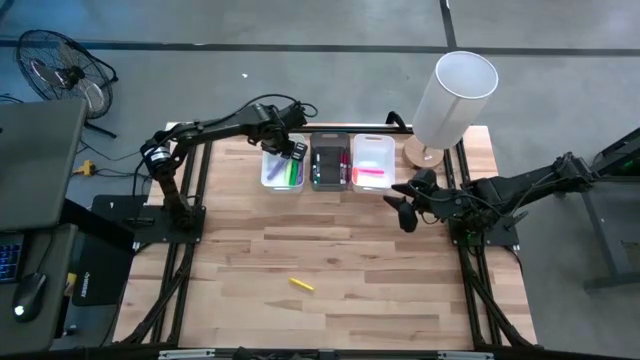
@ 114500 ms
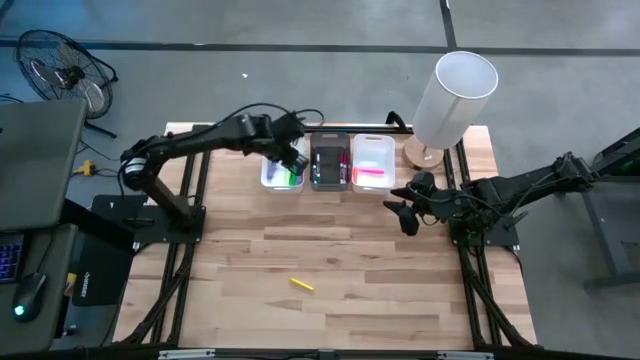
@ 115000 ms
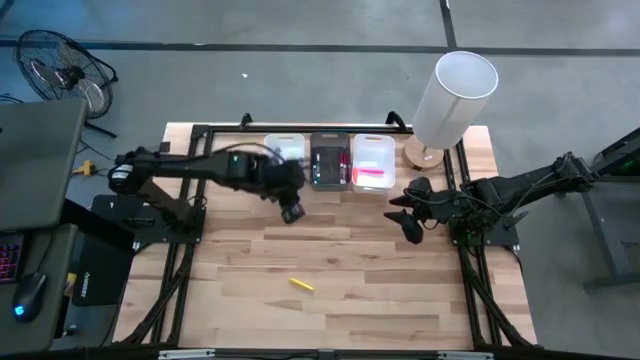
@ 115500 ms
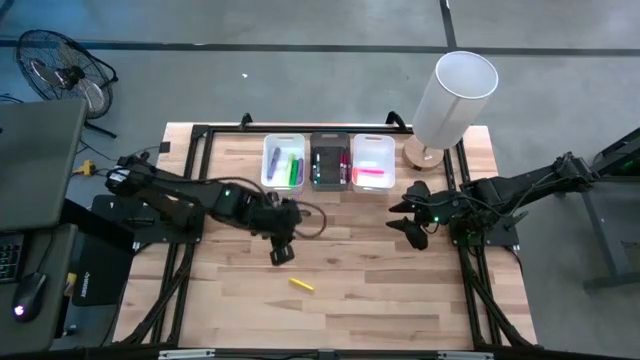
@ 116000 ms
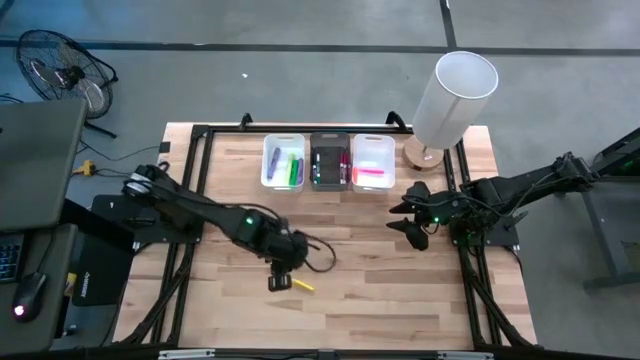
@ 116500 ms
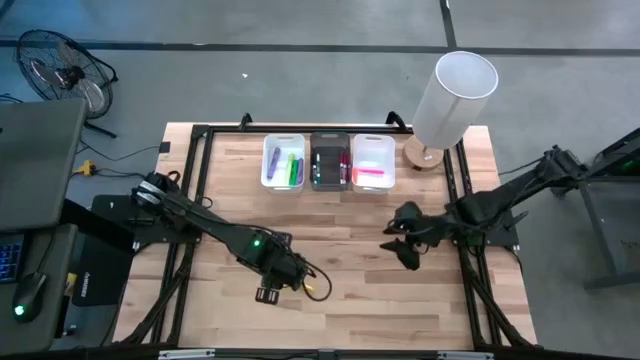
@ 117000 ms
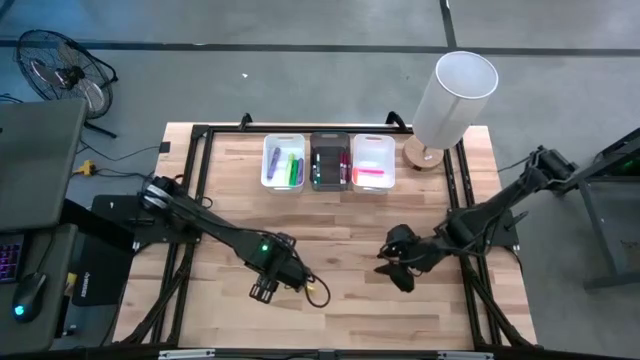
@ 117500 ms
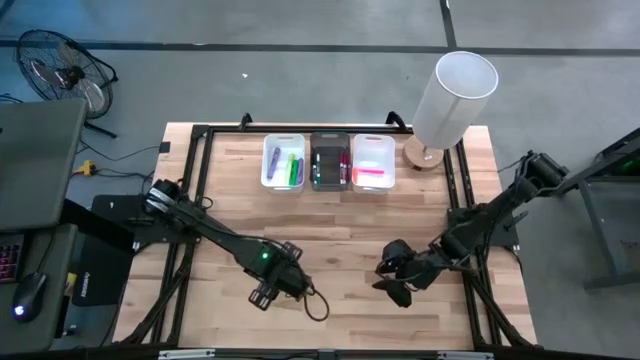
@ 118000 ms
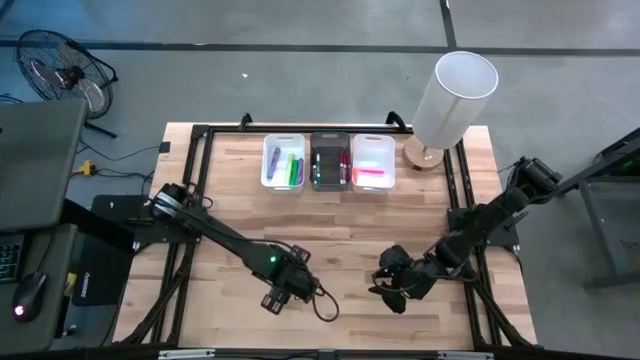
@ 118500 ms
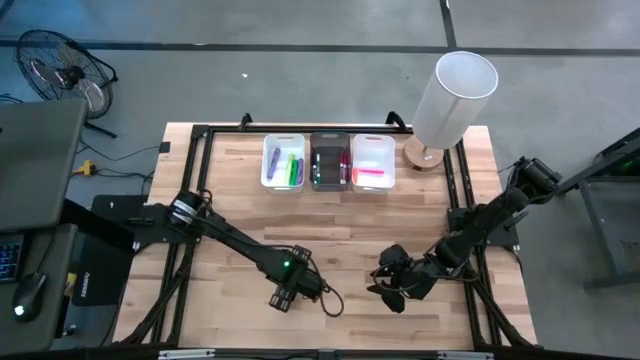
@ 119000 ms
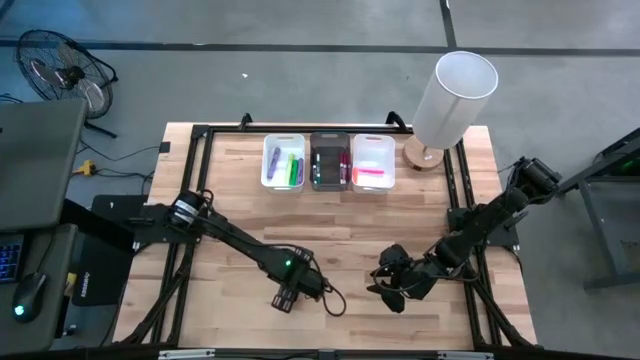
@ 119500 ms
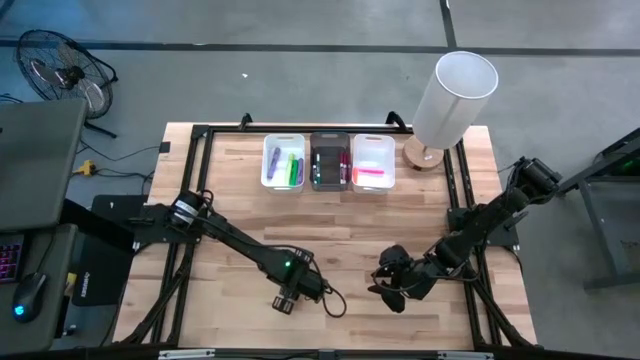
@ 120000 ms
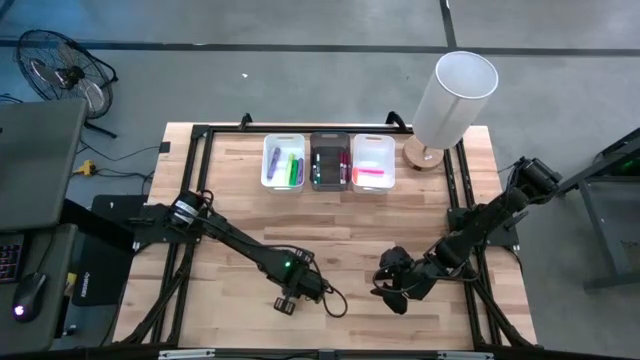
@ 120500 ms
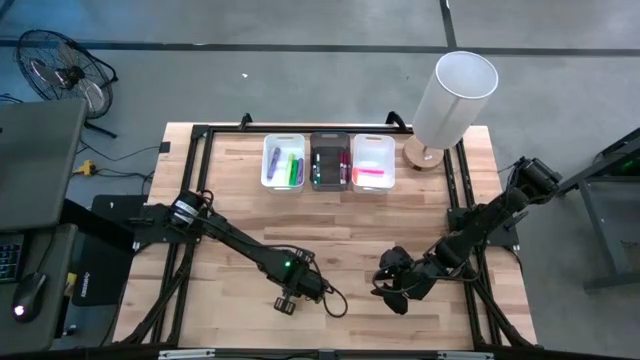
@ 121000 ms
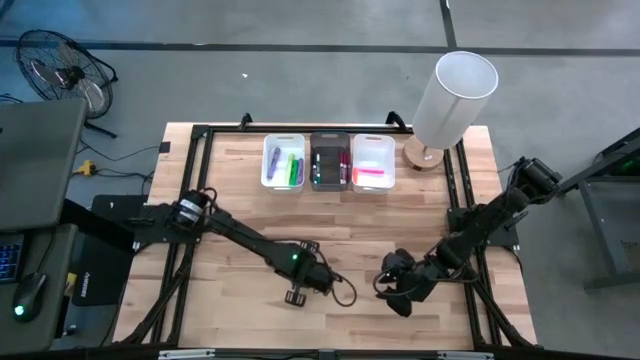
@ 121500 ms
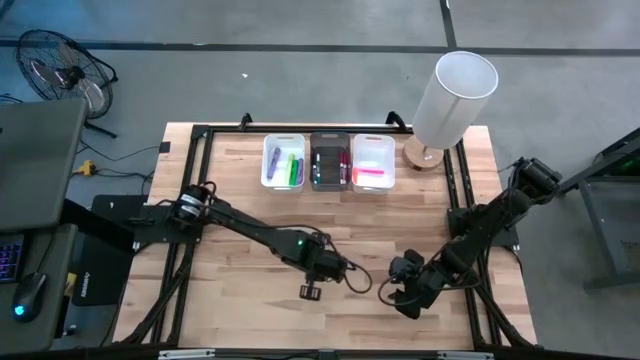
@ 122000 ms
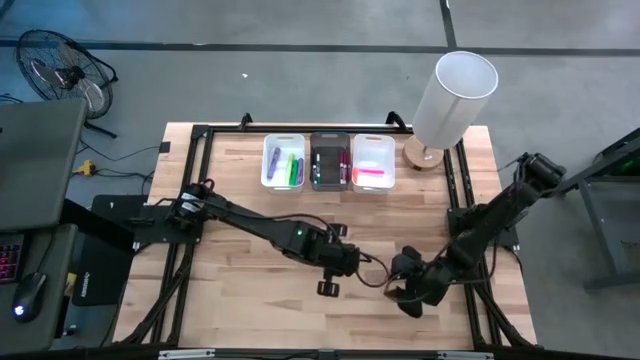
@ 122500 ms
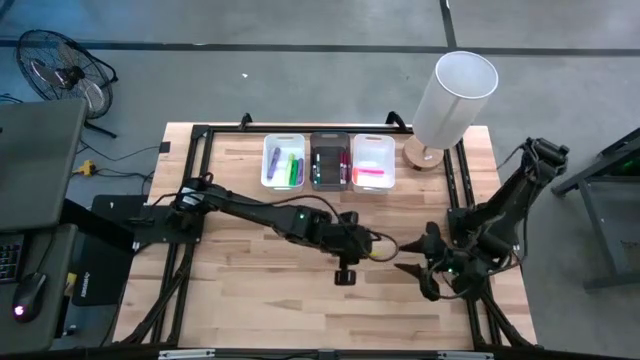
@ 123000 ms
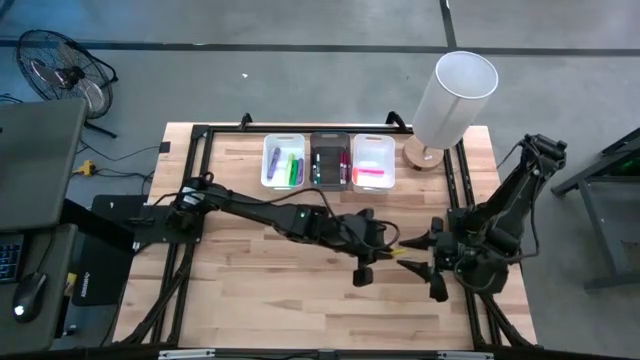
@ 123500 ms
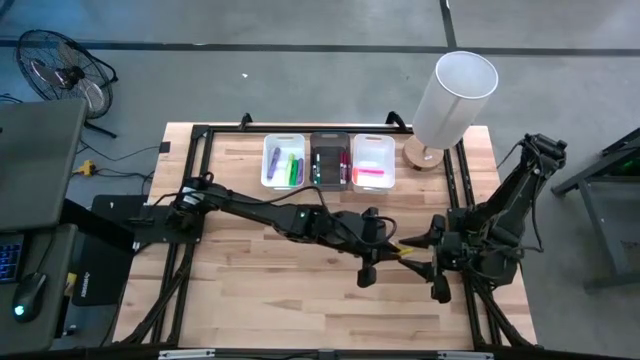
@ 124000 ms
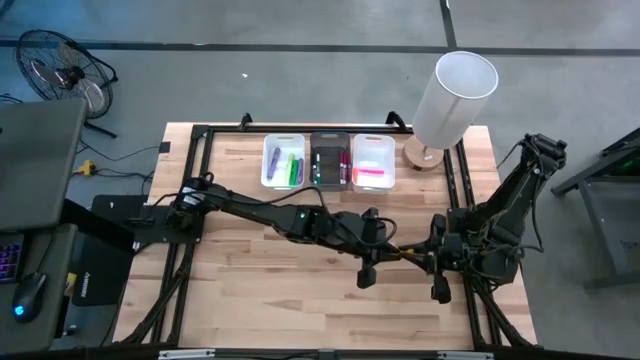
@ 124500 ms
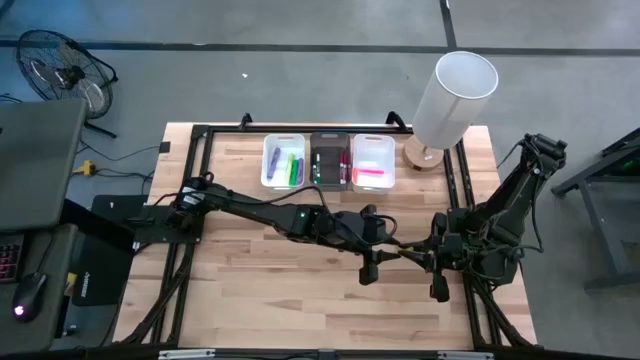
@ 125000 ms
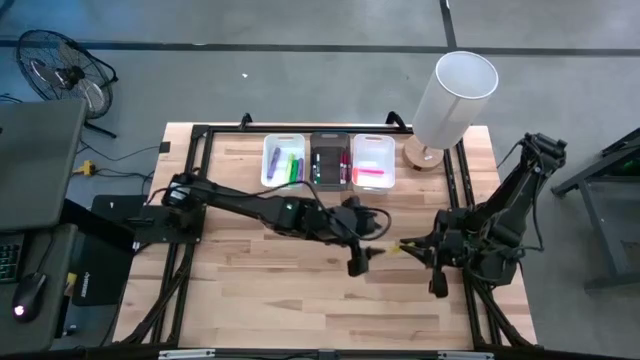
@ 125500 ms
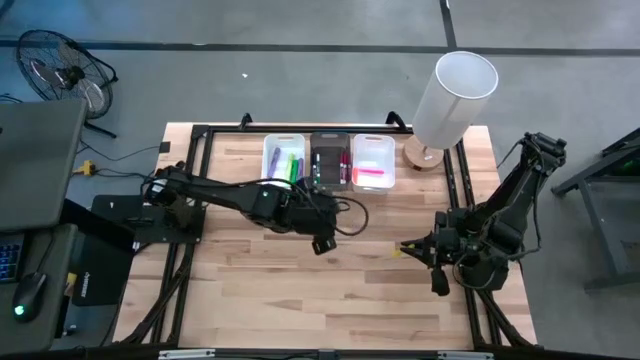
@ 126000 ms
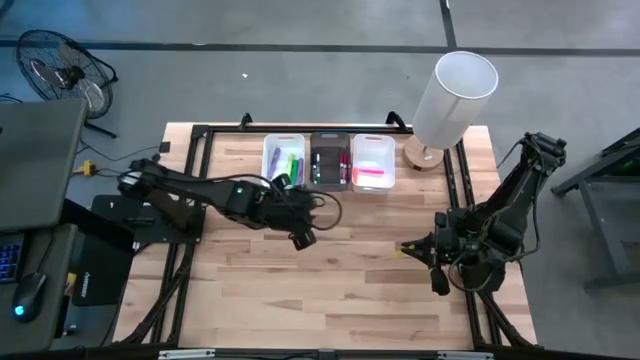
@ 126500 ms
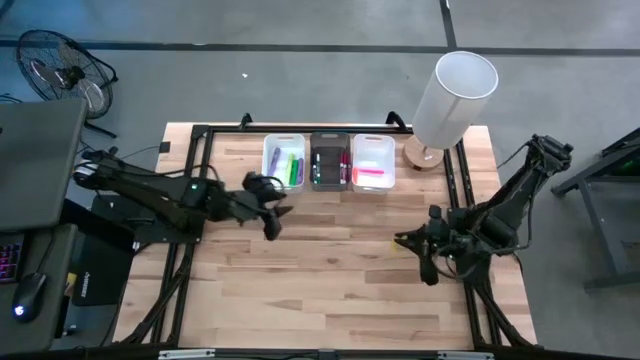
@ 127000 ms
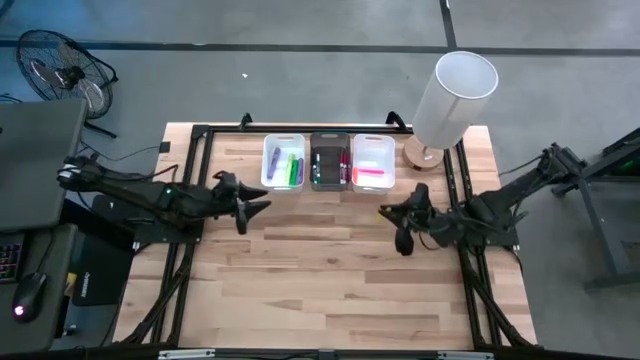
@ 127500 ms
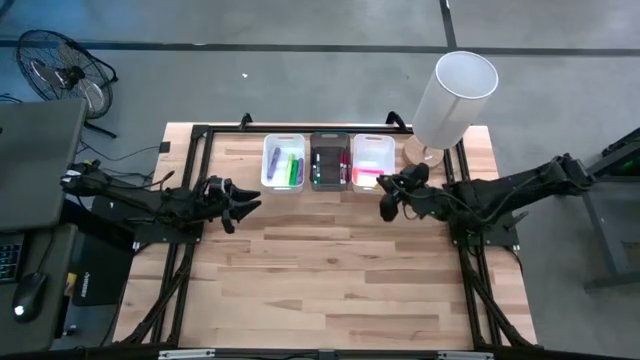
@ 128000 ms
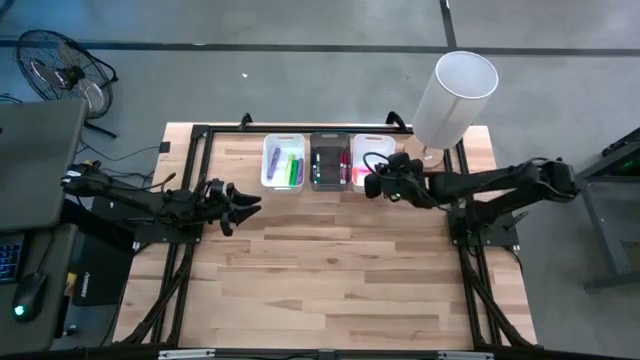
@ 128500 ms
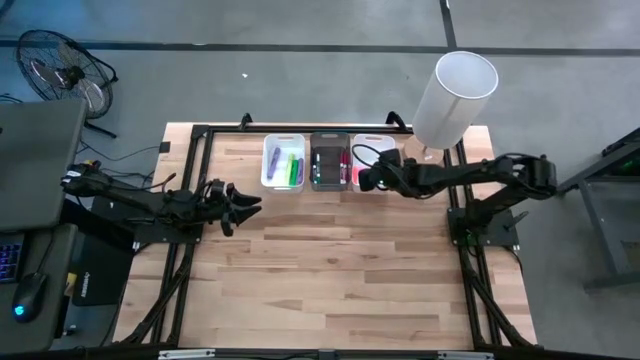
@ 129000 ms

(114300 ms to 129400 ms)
Task: Pick & Place Markers
Put the yellow pen into the right white bin

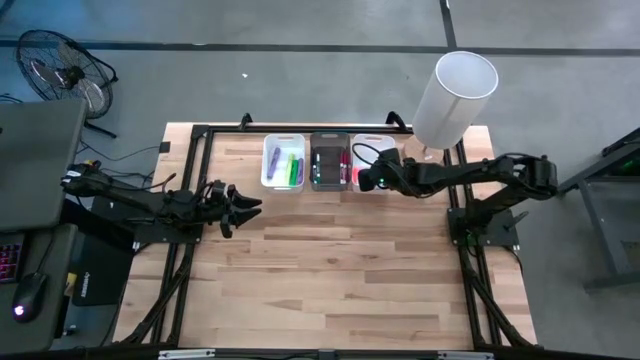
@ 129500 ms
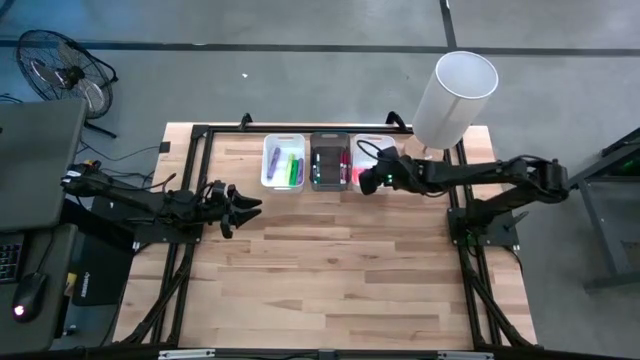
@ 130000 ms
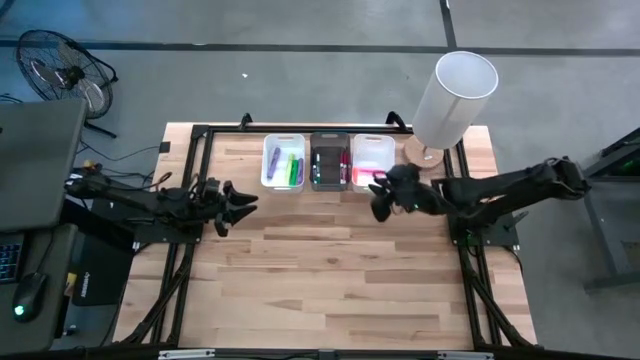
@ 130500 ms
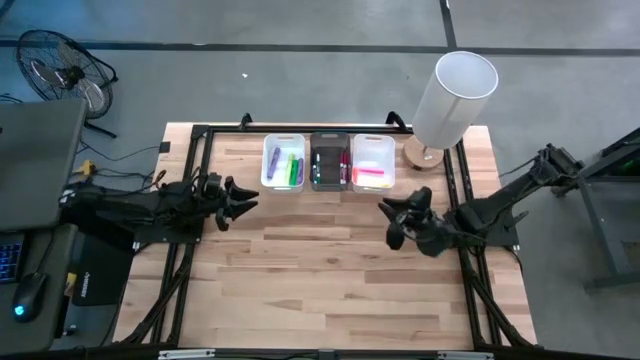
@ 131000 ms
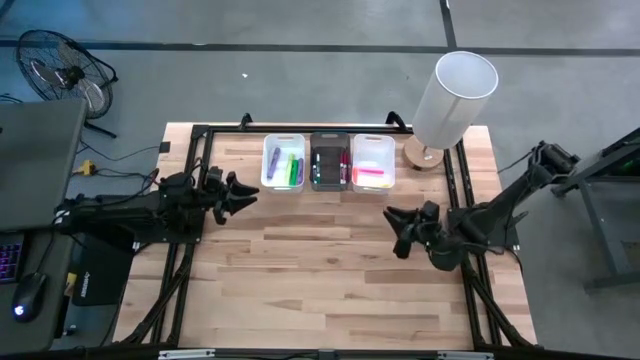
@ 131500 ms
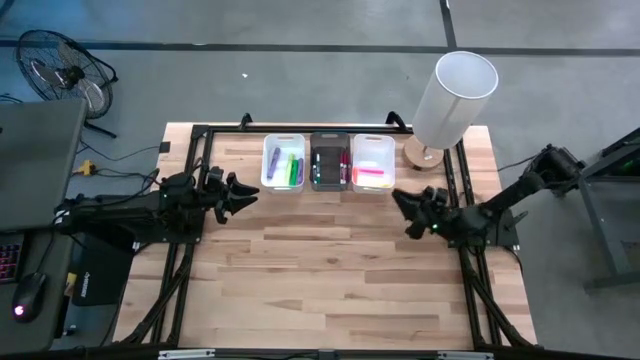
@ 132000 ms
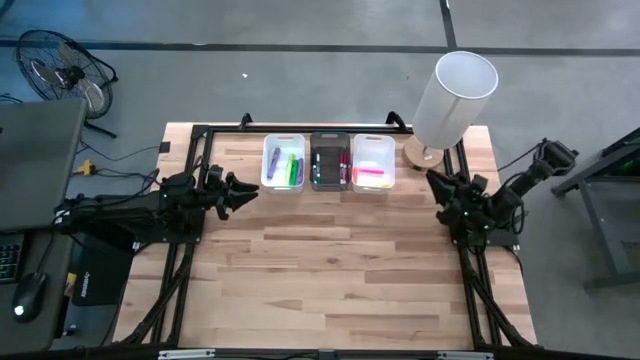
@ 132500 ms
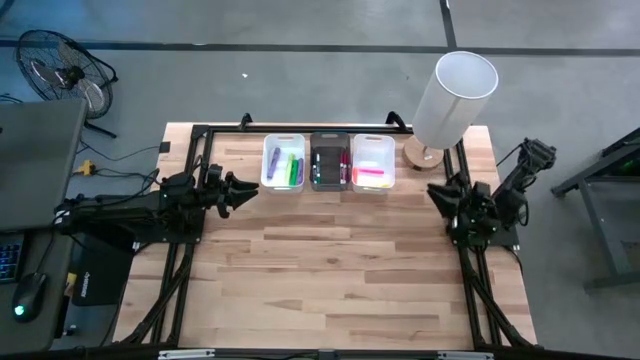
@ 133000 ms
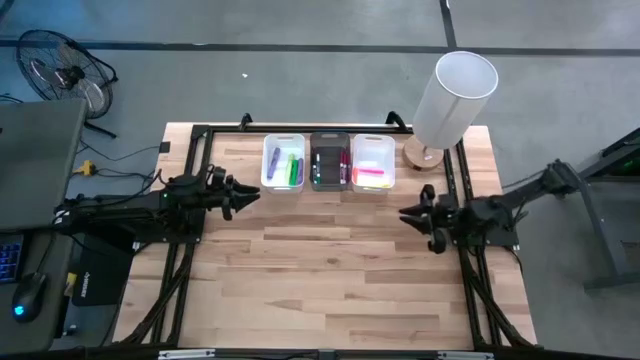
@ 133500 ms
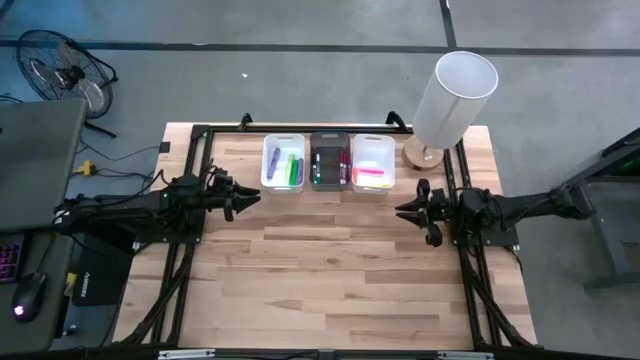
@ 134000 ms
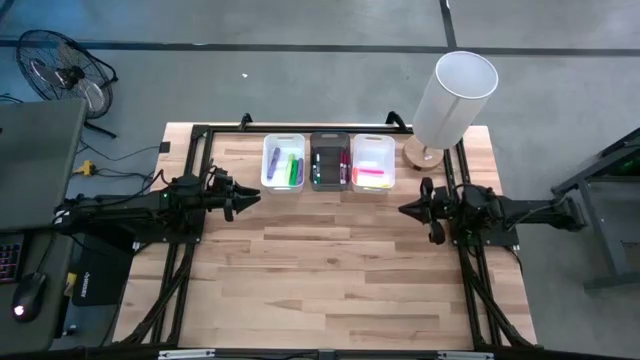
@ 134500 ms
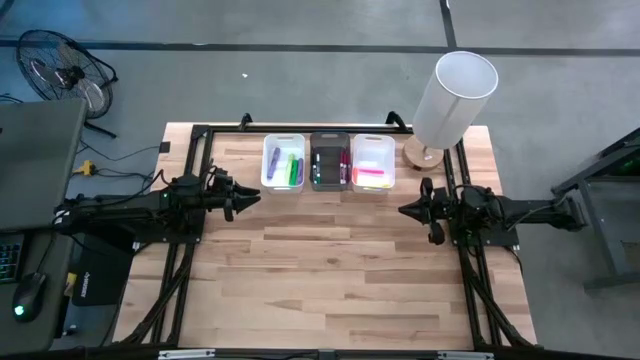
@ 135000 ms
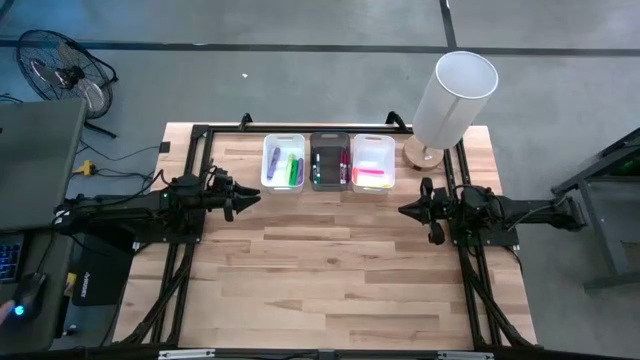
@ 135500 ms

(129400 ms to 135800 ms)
Return to Home Position

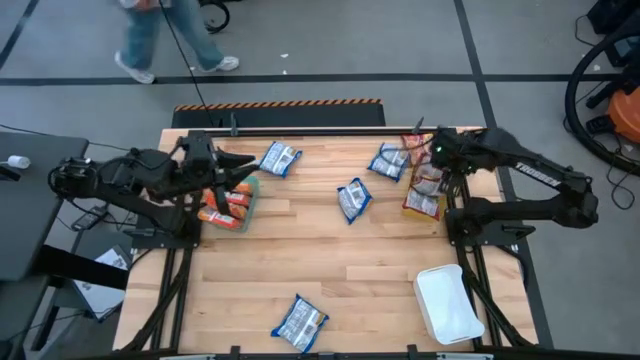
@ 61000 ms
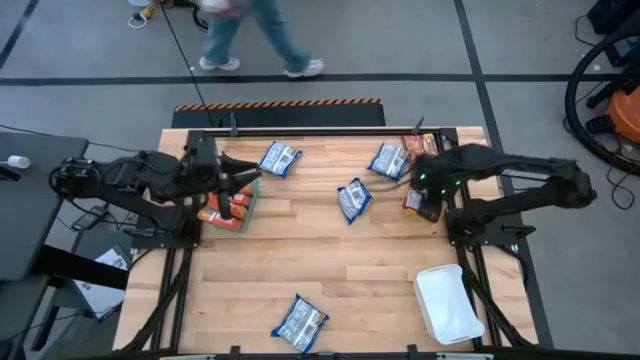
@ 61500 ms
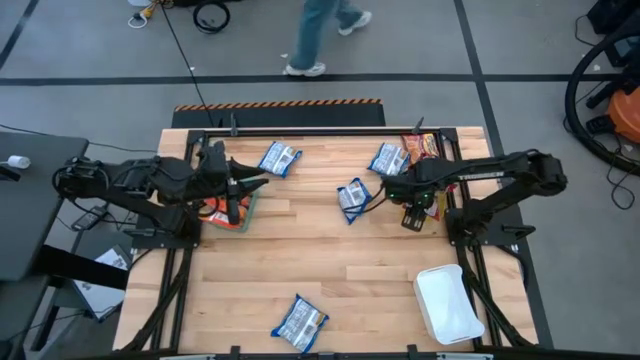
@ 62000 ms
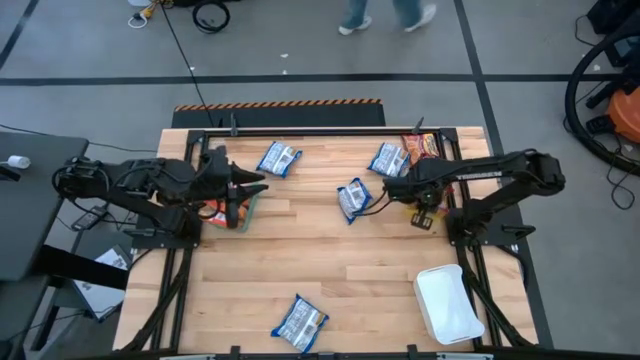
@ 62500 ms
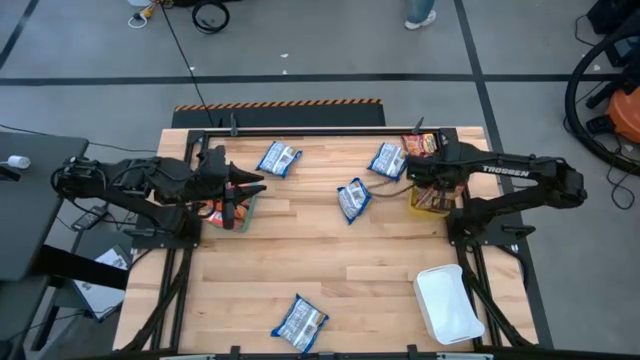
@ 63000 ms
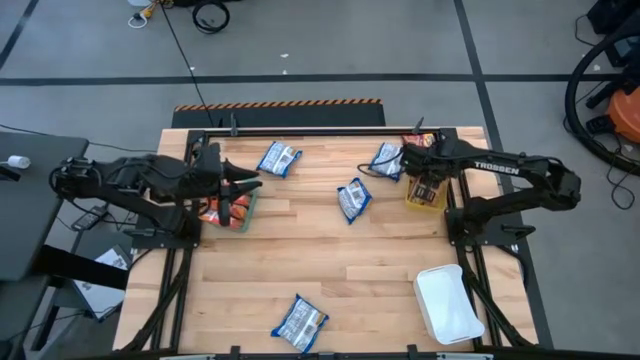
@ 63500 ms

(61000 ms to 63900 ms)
Task: Sort Maruchan noodles
Adjust the red noodle pack
